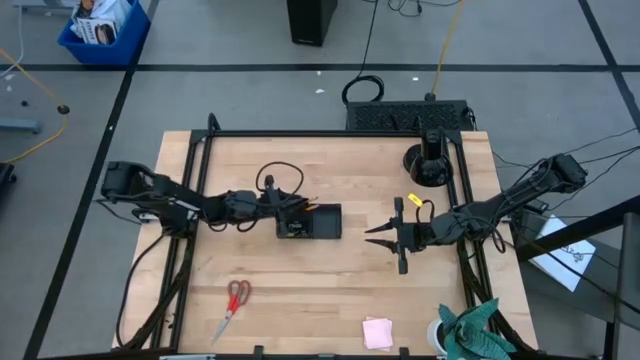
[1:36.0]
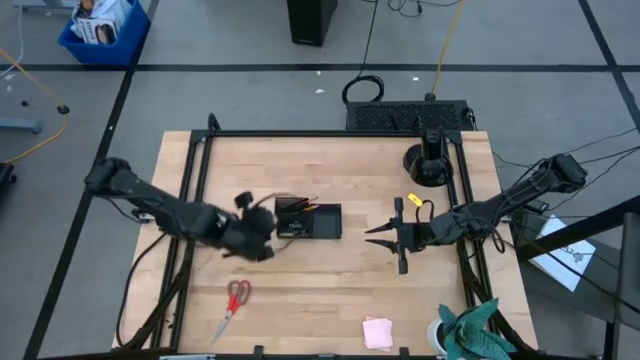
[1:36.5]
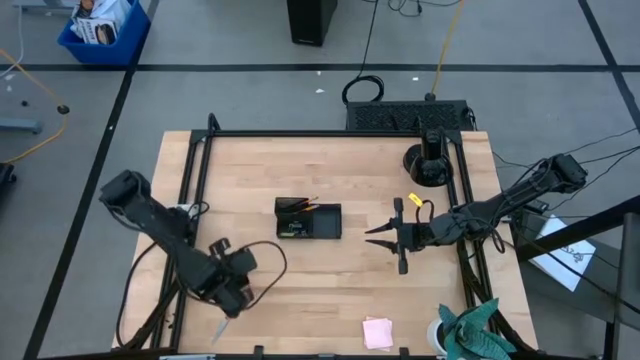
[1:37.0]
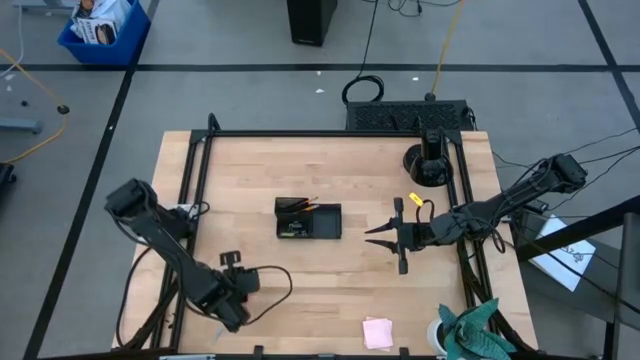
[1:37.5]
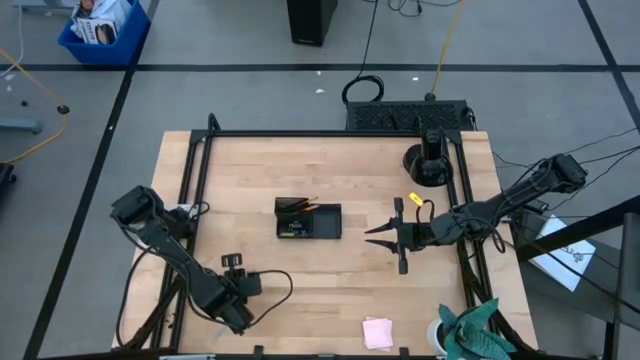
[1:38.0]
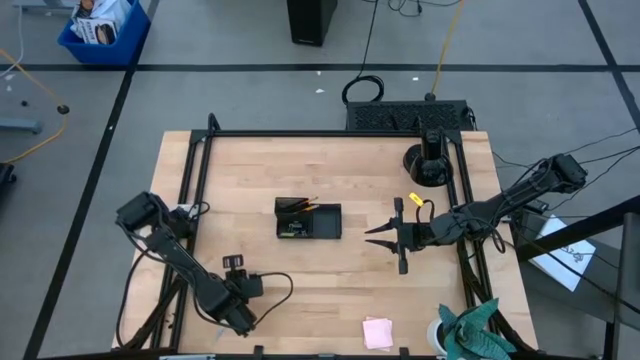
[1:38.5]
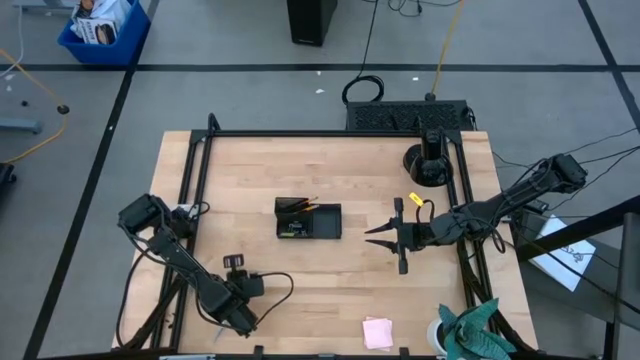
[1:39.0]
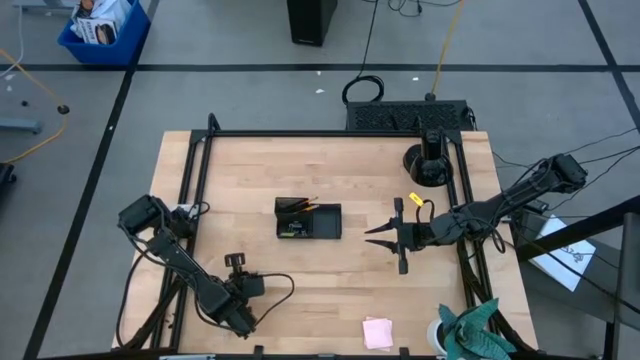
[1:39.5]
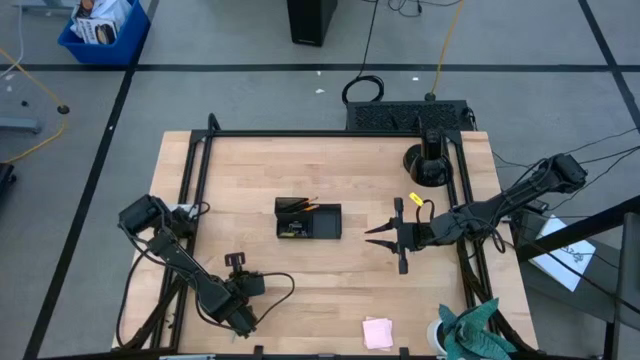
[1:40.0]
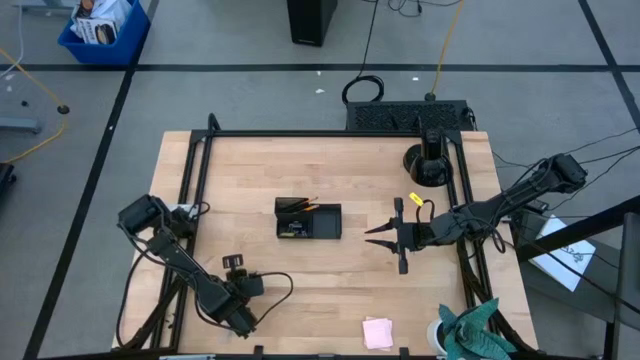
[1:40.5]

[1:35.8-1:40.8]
Task: Pick and place office supplies into organizer
Put the red scissors into the black desk organizer

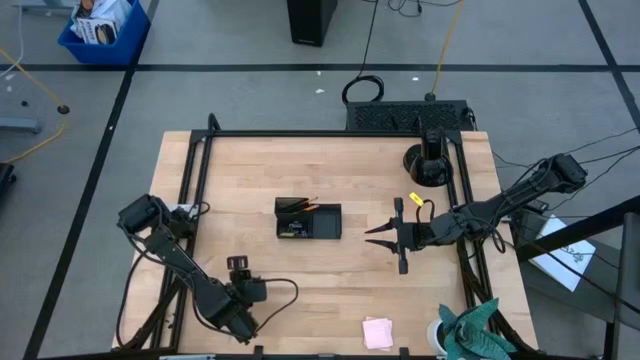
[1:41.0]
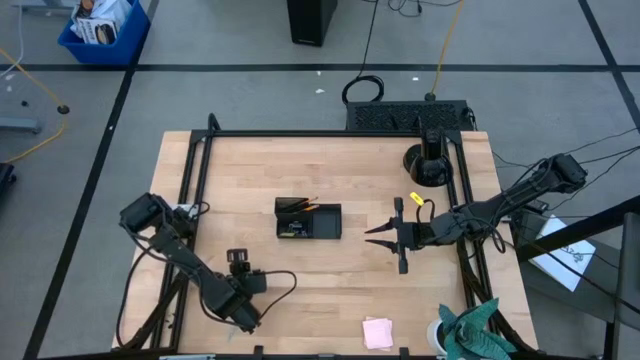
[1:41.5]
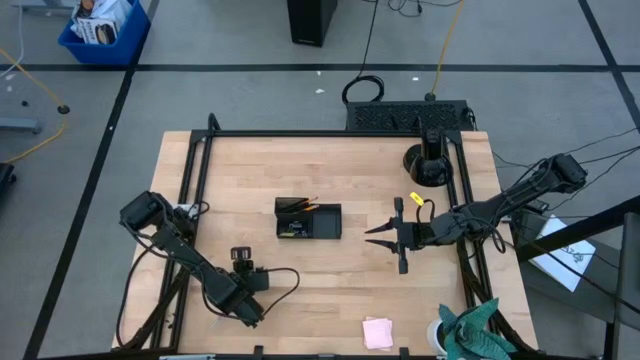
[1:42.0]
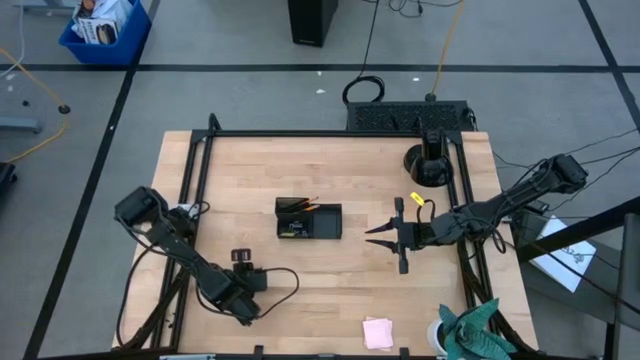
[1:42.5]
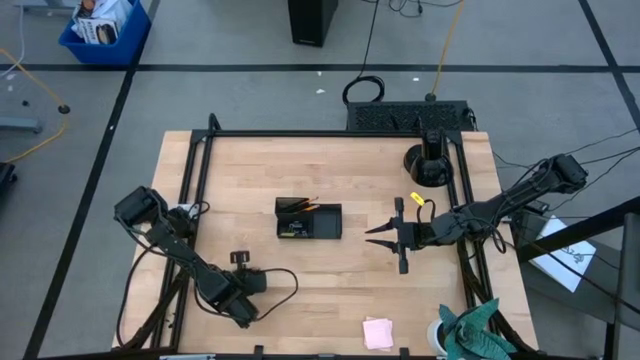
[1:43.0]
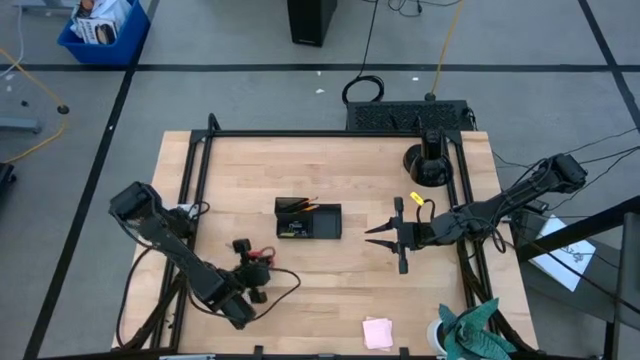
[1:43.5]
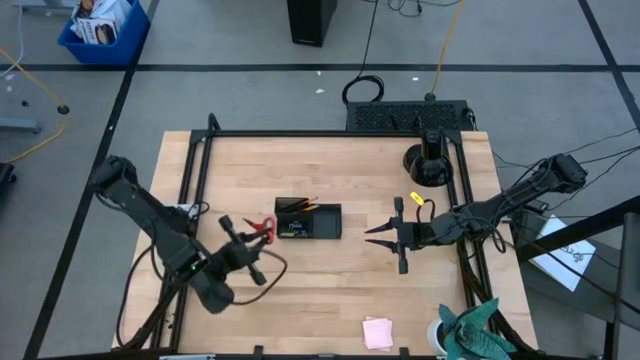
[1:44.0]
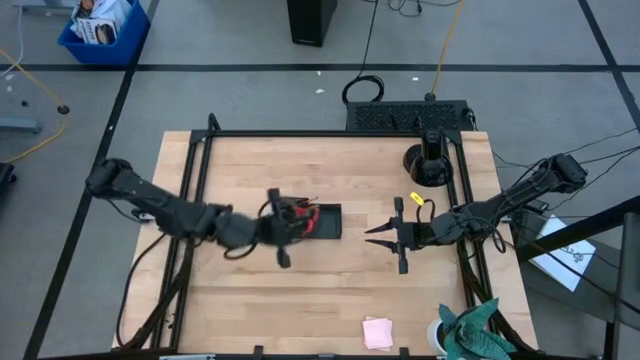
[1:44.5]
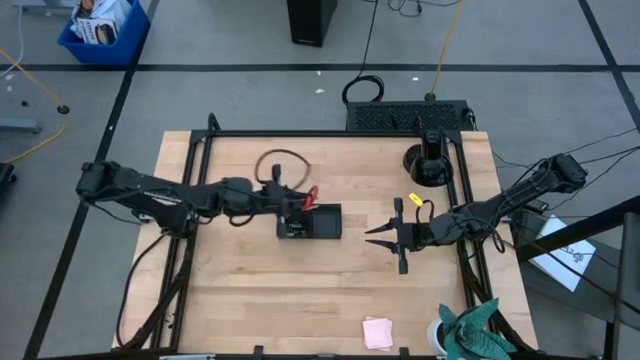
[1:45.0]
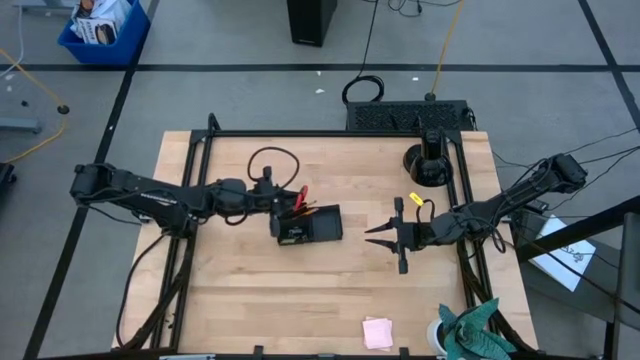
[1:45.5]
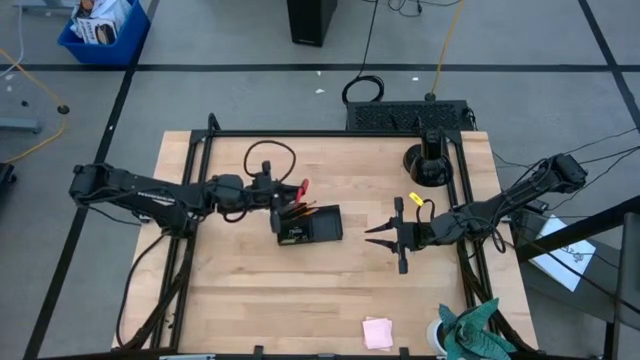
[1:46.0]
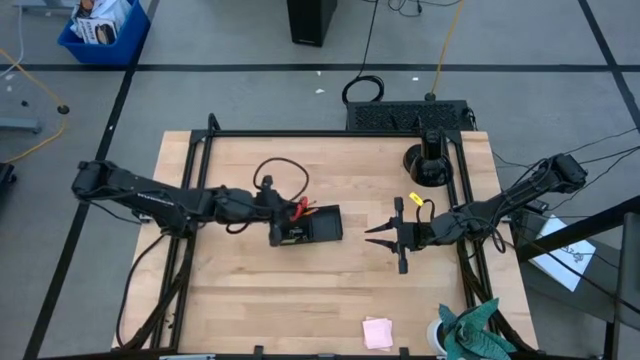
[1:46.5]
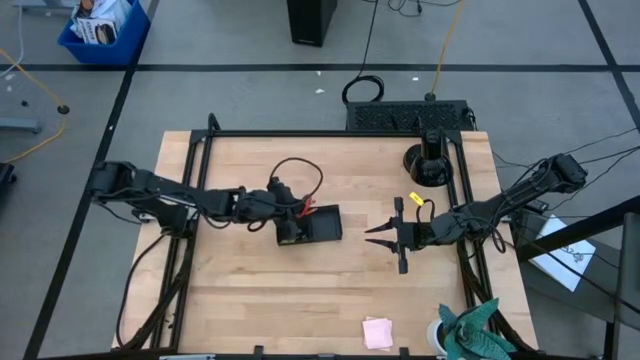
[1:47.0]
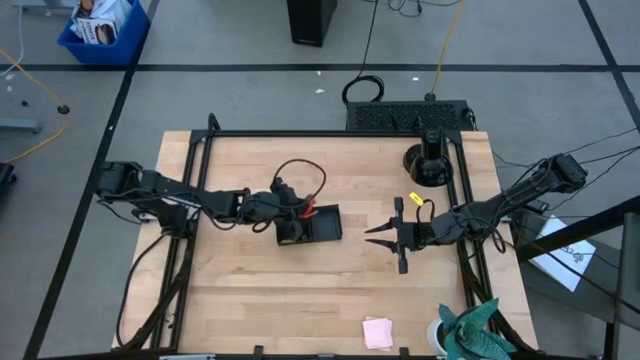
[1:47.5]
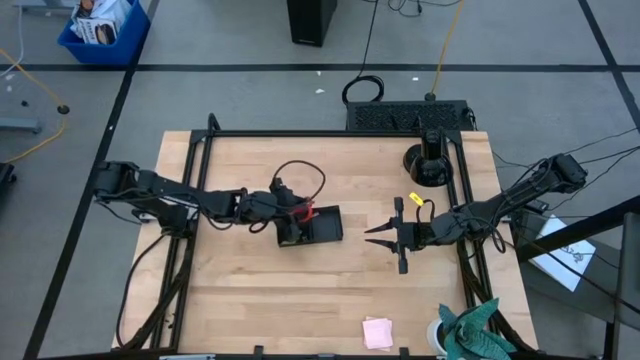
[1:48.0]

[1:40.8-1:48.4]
Put the red scissors into the black desk organizer

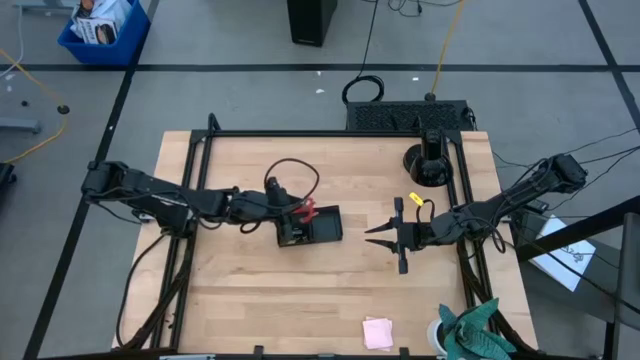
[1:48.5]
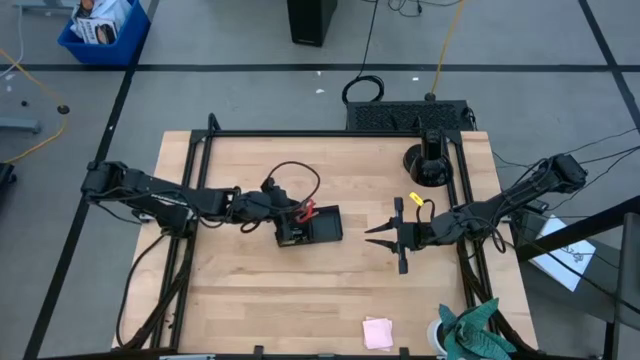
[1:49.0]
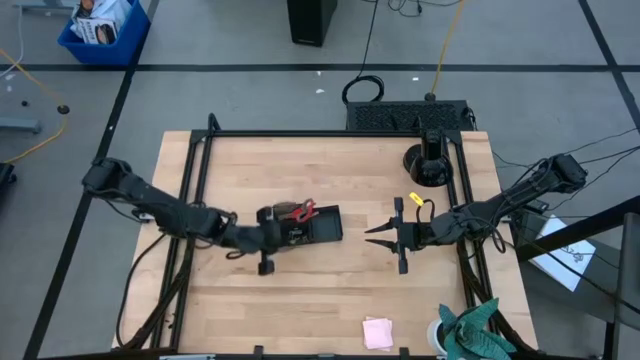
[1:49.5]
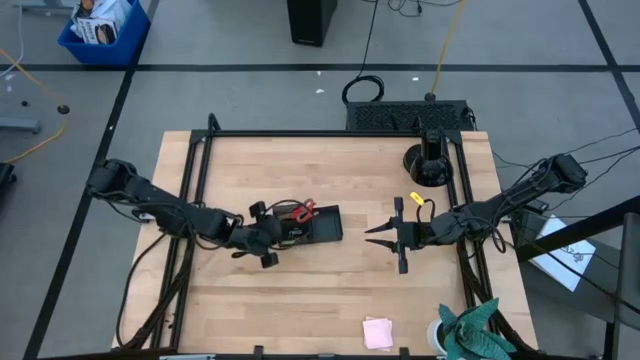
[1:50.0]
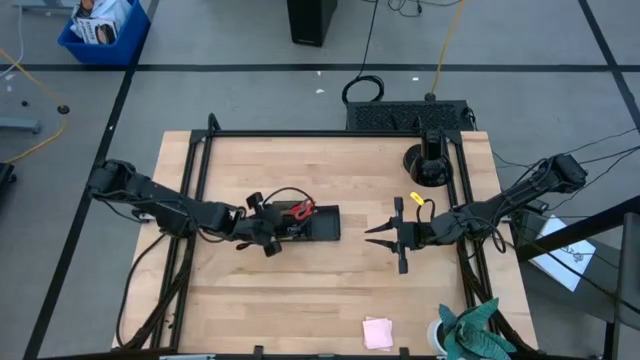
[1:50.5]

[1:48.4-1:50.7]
Adjust the black desk organizer on the table

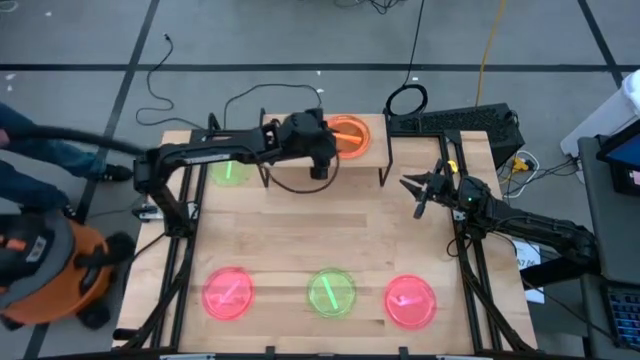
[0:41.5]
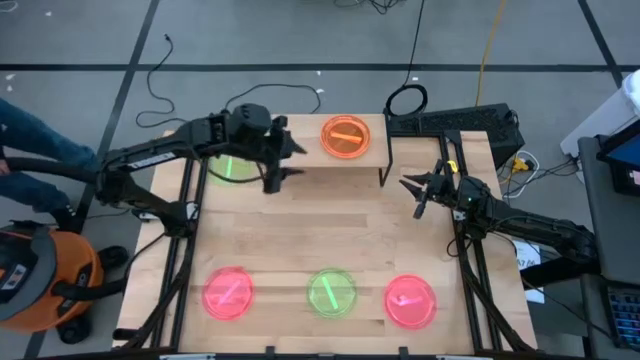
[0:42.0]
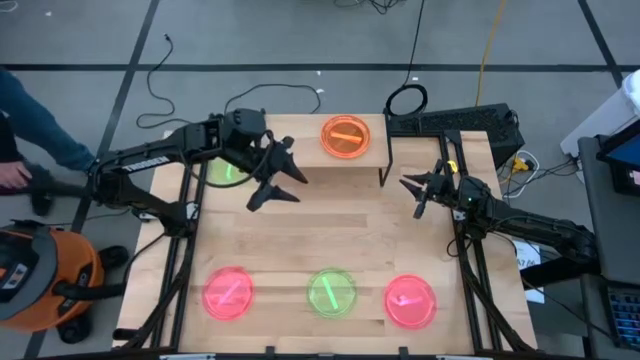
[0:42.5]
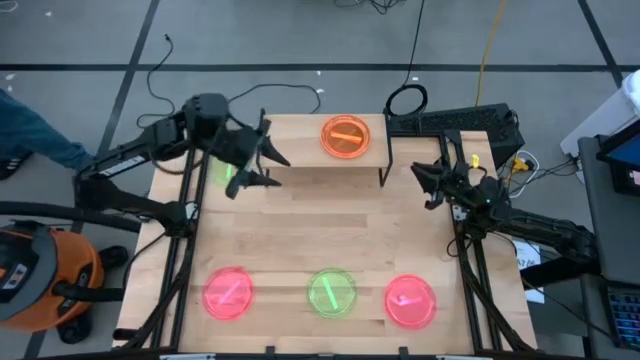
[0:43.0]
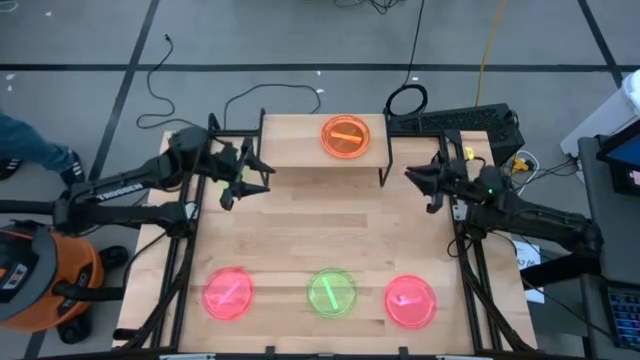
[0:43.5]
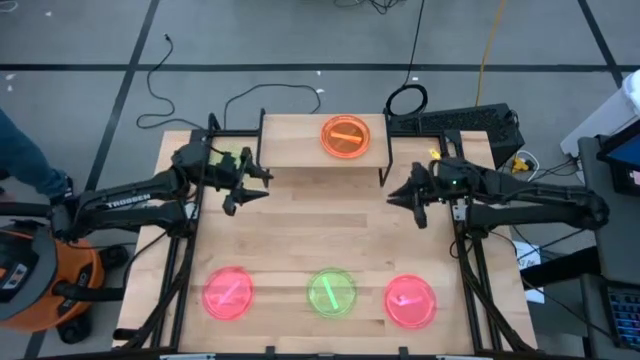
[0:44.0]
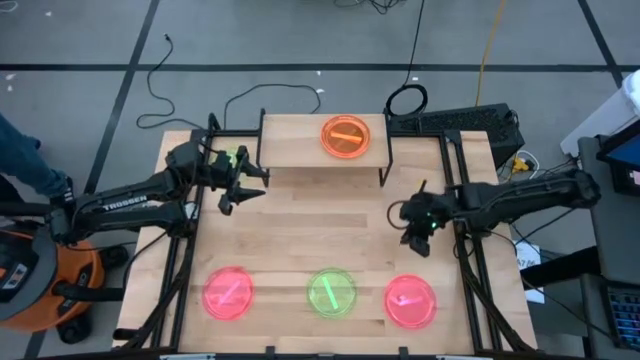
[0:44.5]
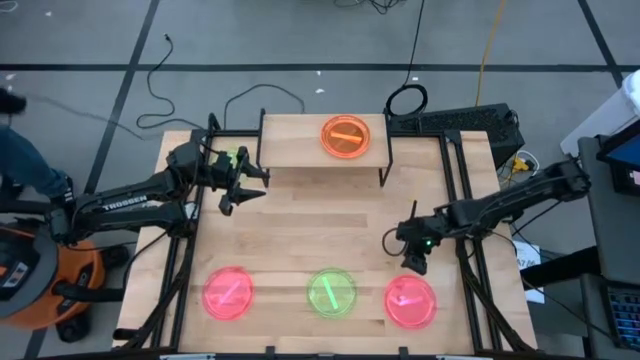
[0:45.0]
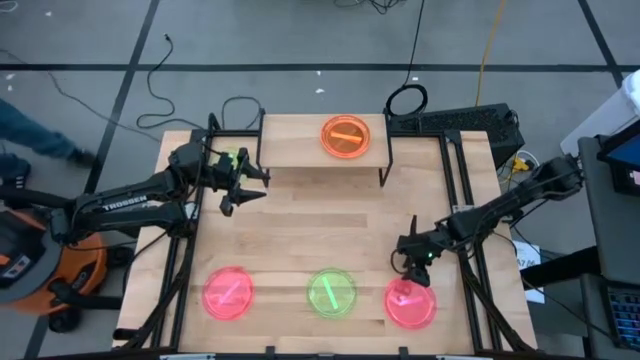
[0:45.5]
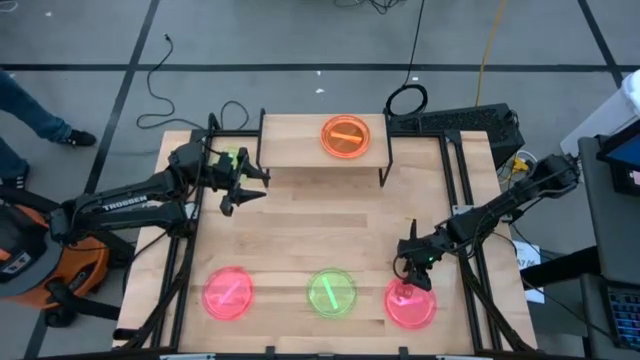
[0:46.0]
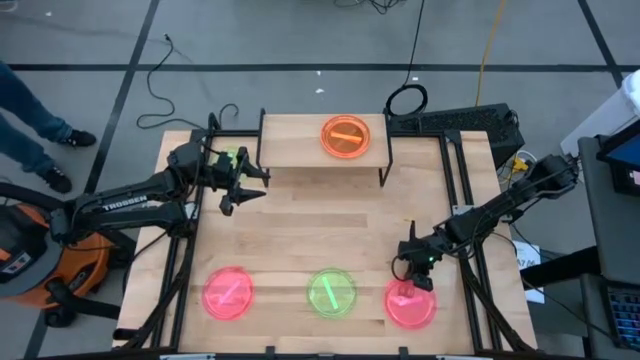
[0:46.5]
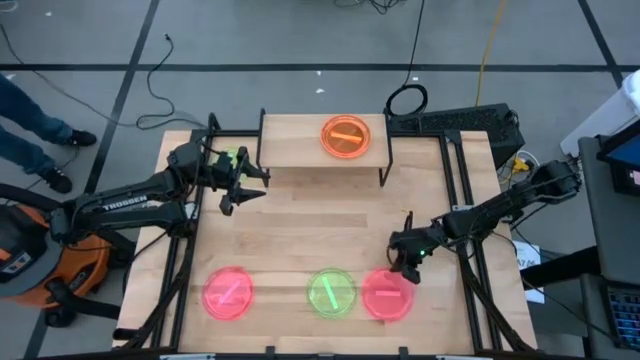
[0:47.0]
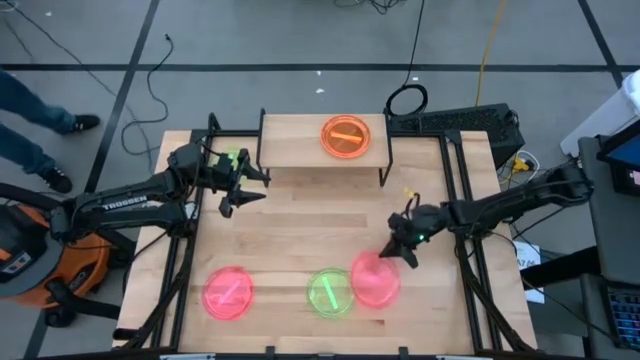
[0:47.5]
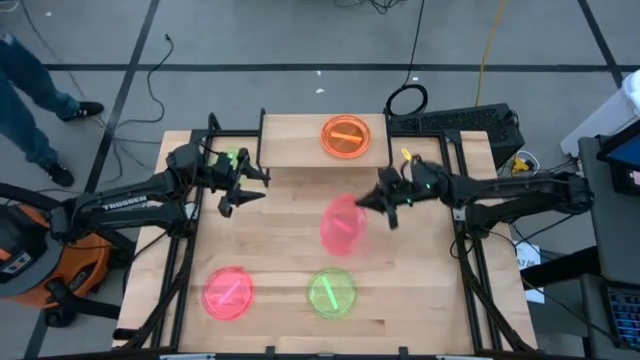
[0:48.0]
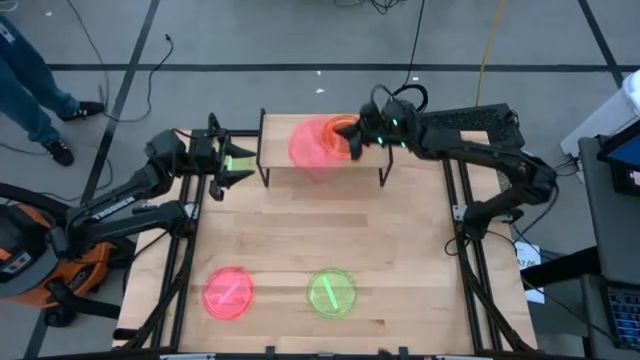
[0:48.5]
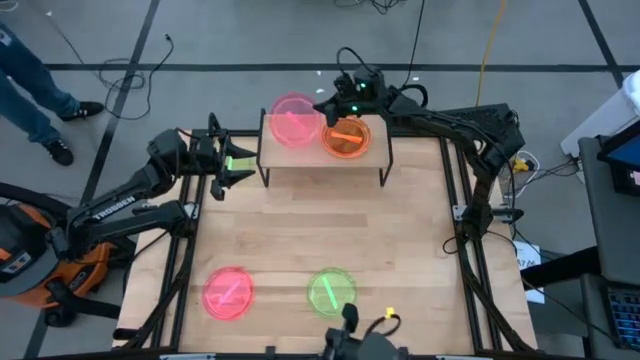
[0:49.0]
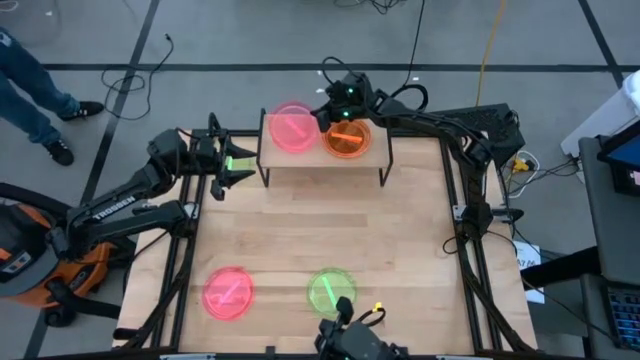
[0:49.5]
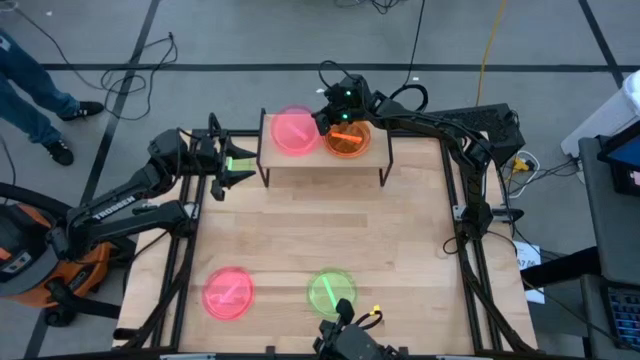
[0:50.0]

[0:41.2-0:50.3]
Task: Place and stack plates onto a shelf
Put the pink plate on the shelf
